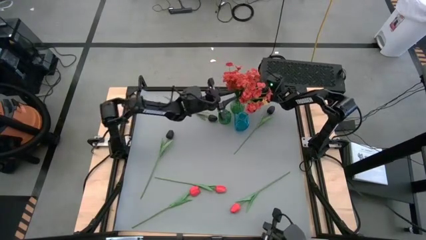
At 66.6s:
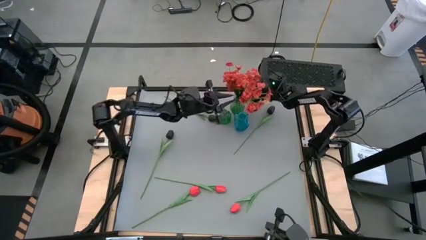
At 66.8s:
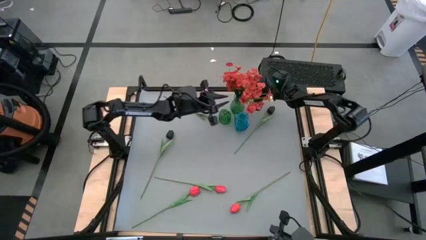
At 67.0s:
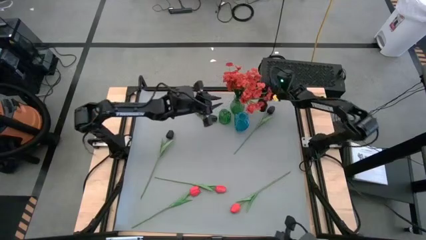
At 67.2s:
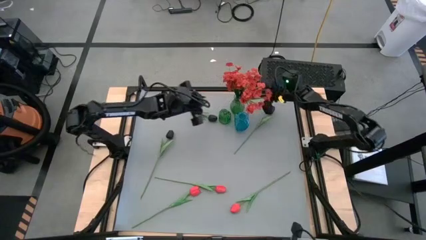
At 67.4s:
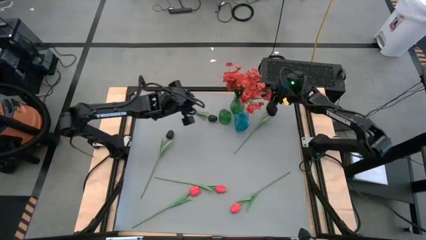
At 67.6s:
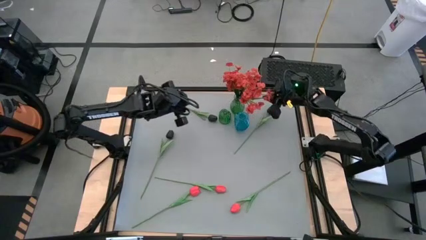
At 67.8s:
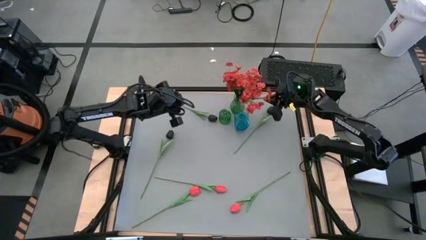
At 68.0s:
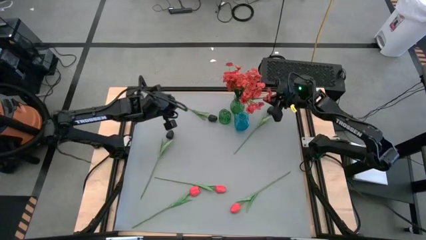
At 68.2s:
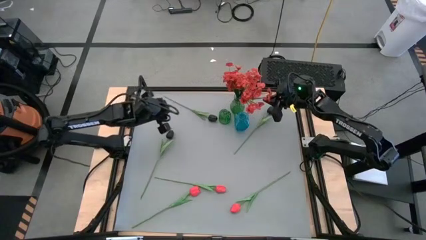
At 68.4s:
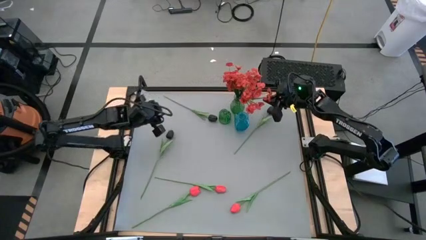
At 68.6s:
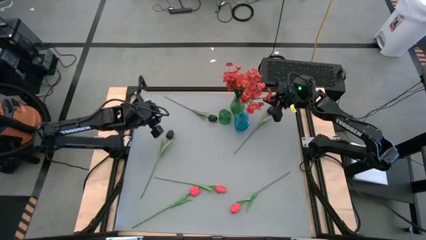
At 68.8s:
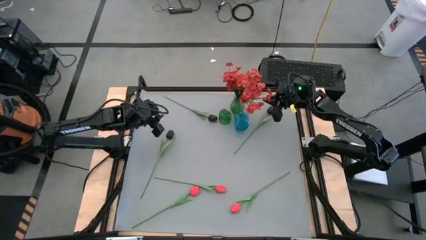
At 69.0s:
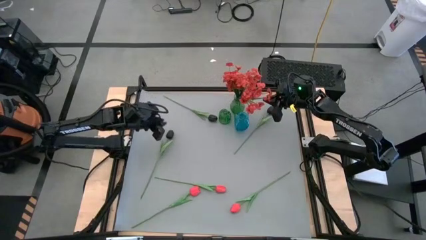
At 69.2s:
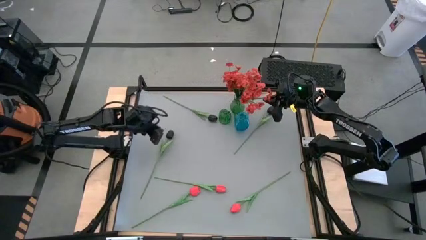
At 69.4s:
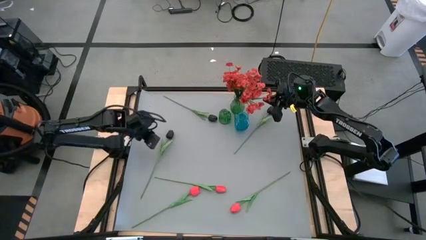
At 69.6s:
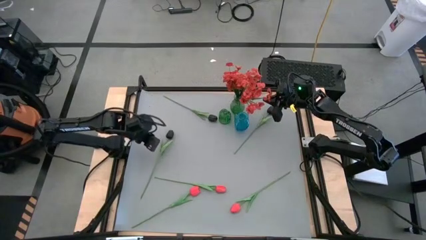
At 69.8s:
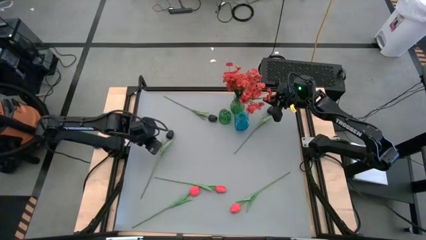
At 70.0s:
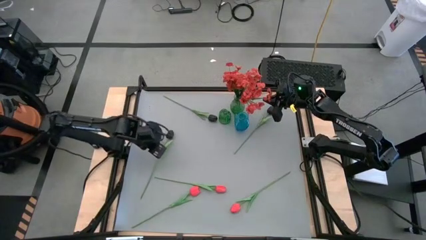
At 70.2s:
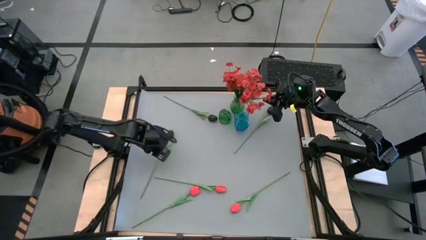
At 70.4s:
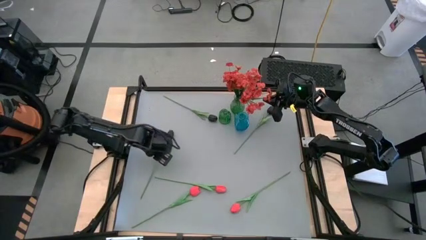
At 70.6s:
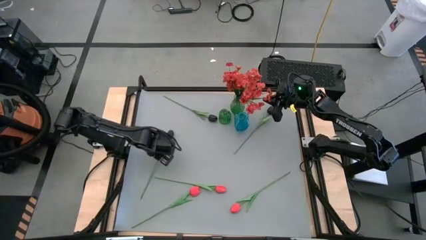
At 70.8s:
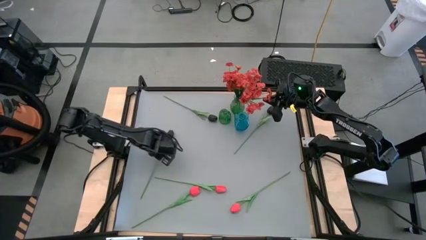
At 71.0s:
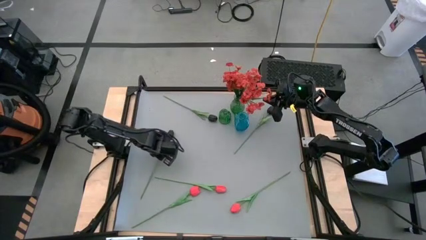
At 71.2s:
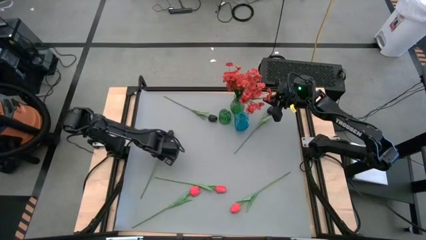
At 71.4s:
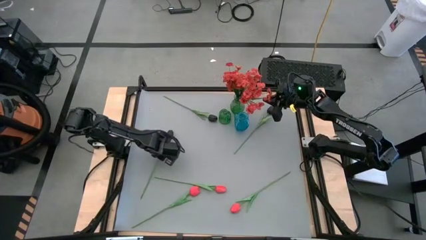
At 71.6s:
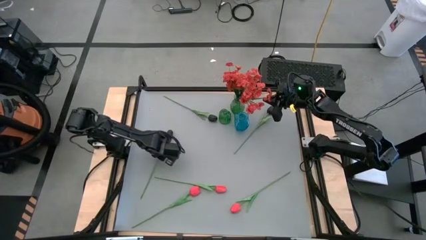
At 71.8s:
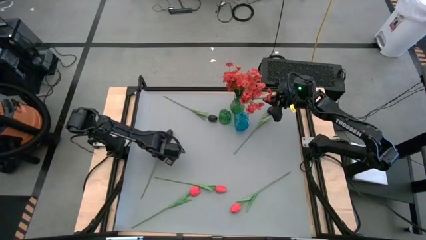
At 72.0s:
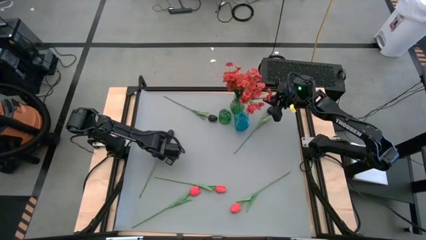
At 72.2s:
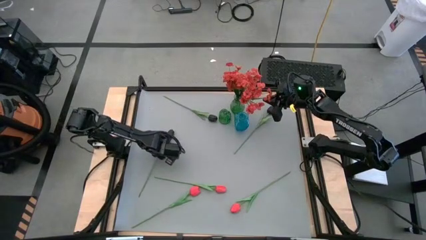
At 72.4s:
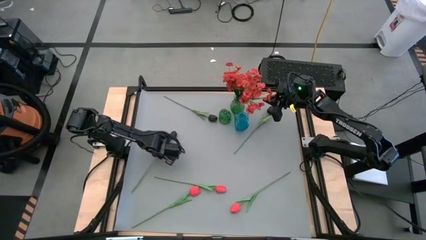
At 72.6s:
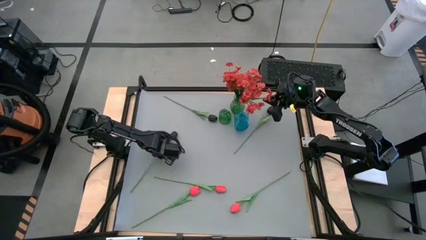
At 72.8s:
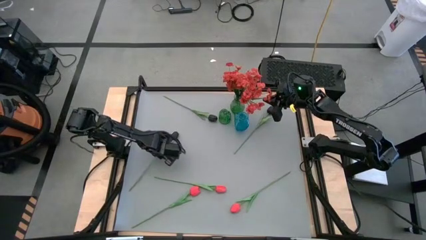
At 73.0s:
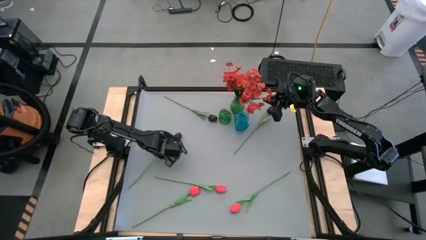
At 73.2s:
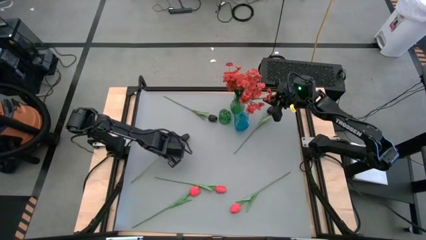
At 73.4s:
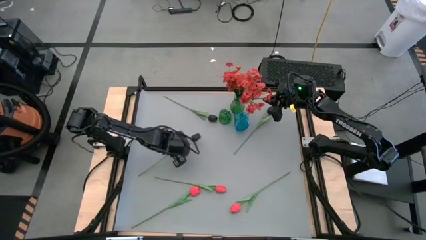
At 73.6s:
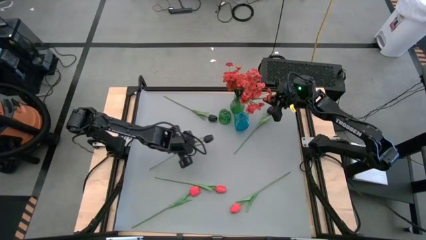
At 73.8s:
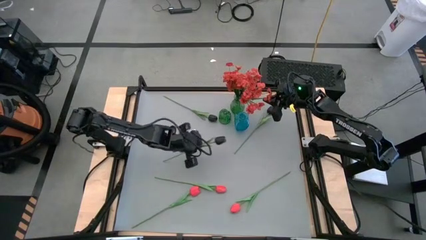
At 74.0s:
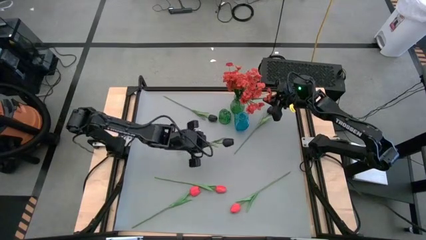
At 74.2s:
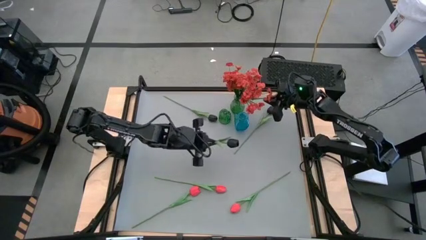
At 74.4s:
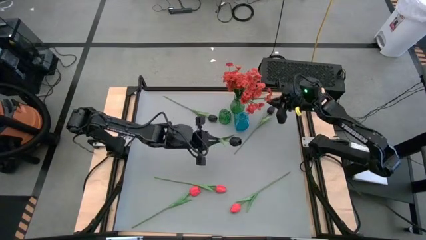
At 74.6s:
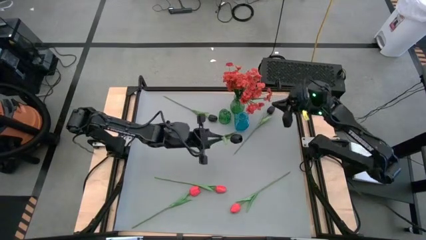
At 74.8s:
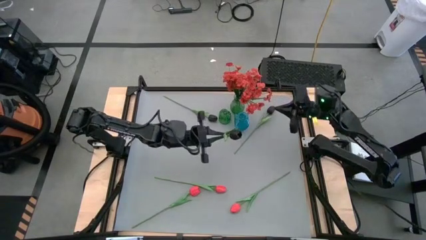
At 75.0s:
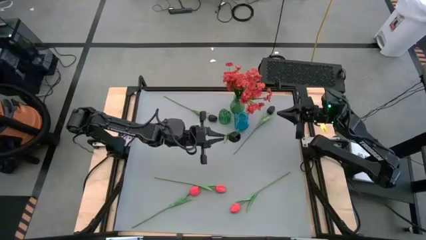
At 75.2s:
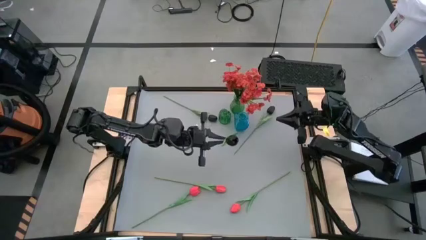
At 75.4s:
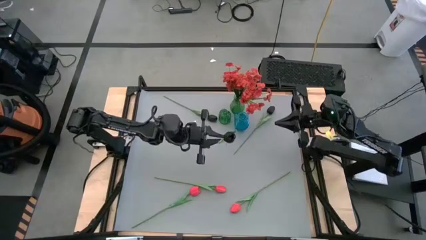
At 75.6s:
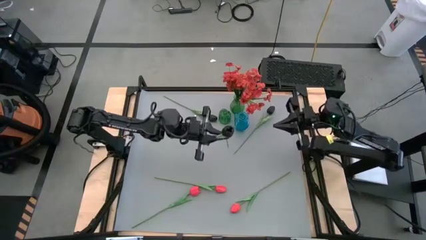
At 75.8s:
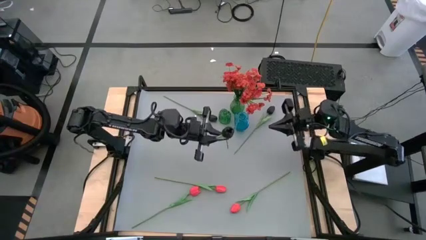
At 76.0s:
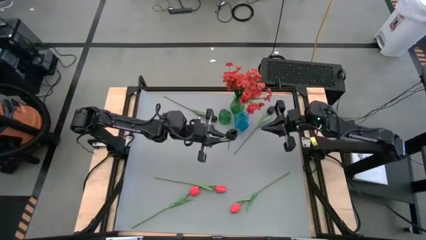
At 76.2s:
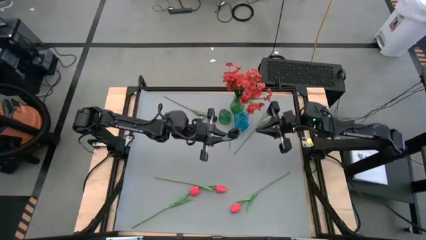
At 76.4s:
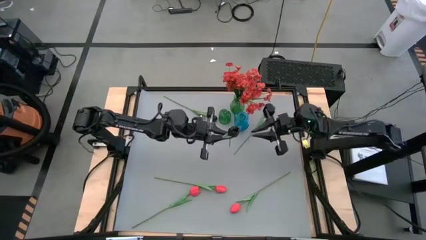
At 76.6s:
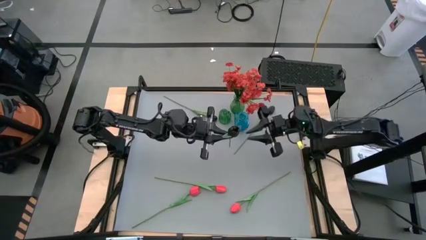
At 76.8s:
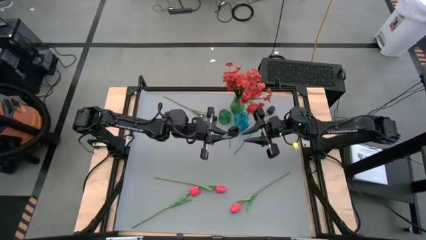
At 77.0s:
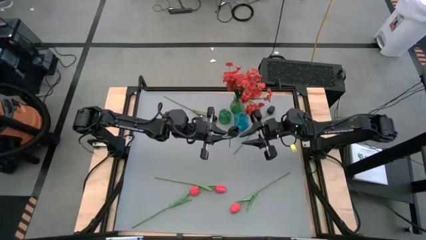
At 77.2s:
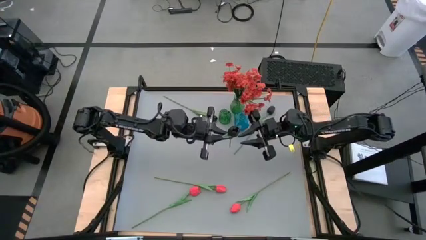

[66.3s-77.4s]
Task: Sort flowers into vase by color
Put the bottom left black flower into the blue vase

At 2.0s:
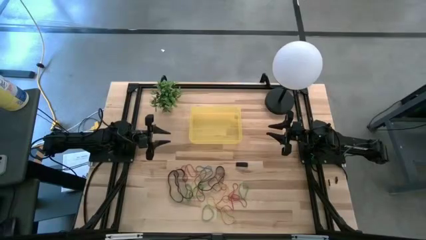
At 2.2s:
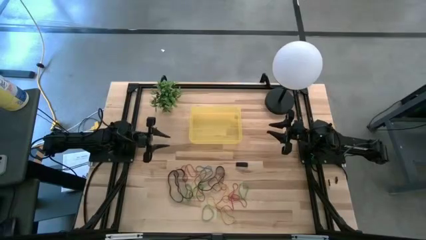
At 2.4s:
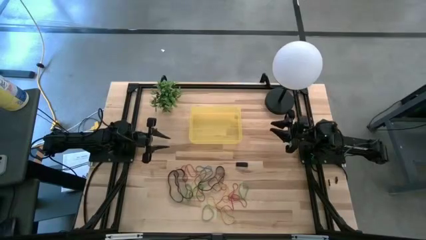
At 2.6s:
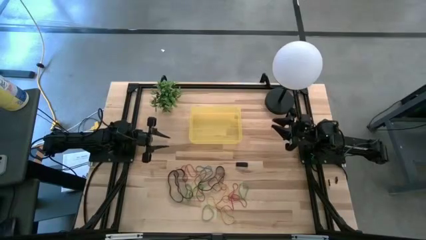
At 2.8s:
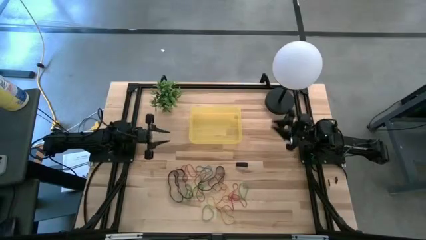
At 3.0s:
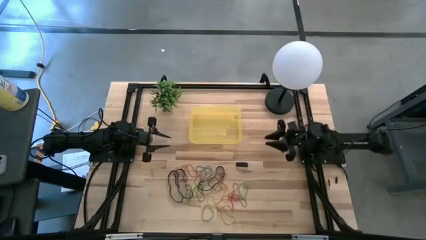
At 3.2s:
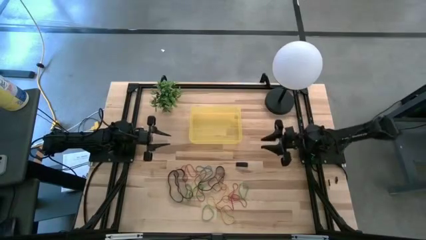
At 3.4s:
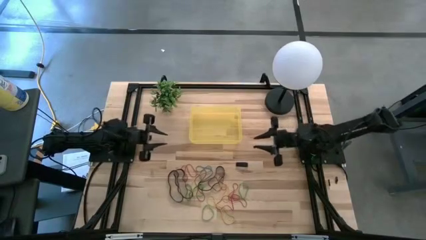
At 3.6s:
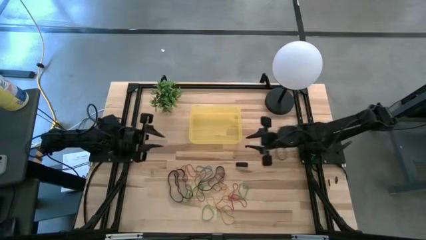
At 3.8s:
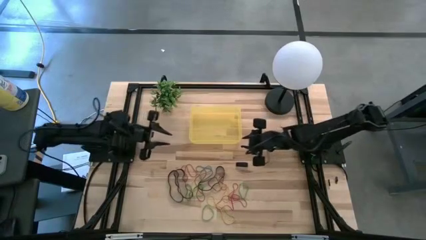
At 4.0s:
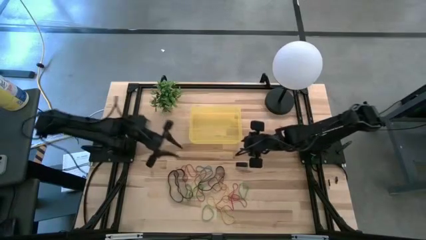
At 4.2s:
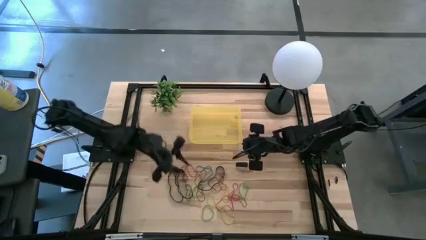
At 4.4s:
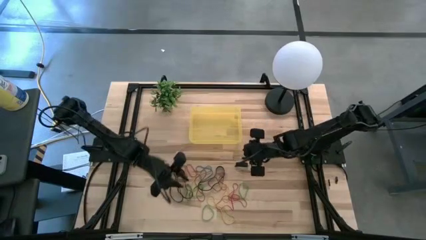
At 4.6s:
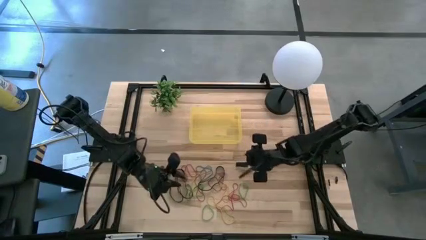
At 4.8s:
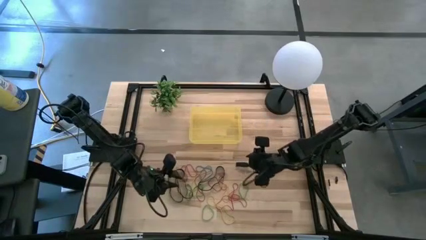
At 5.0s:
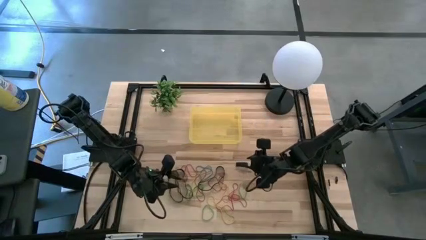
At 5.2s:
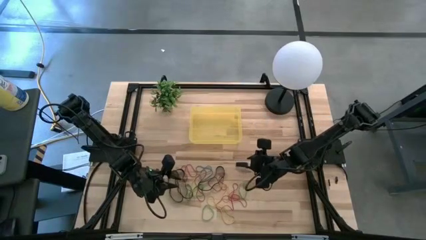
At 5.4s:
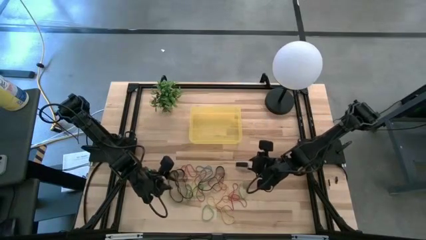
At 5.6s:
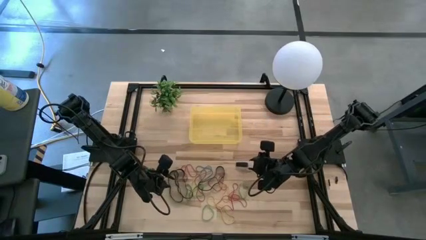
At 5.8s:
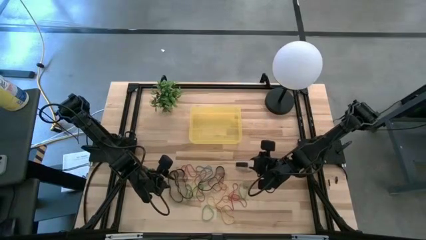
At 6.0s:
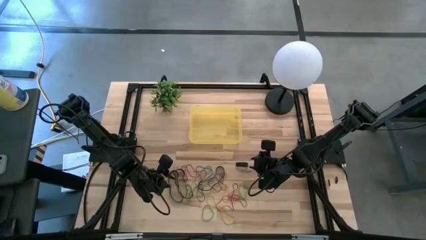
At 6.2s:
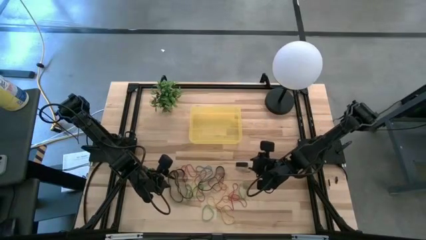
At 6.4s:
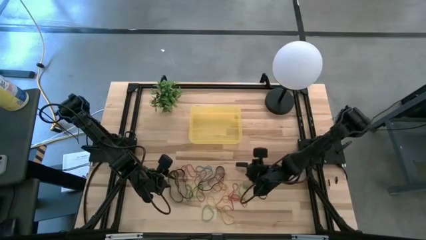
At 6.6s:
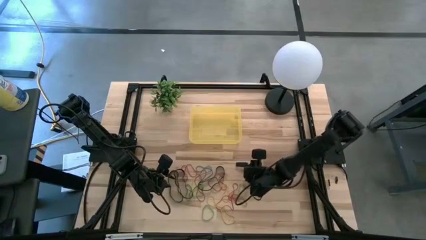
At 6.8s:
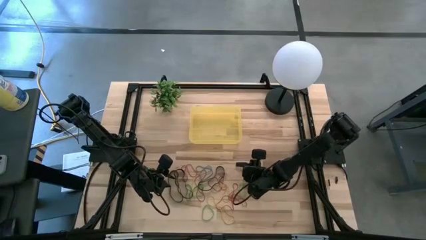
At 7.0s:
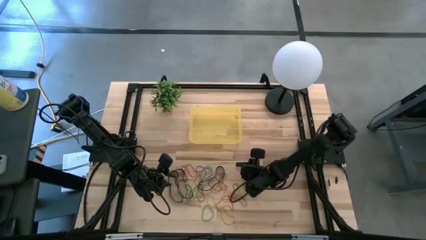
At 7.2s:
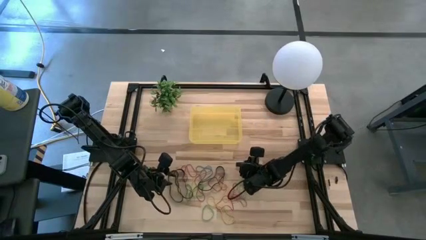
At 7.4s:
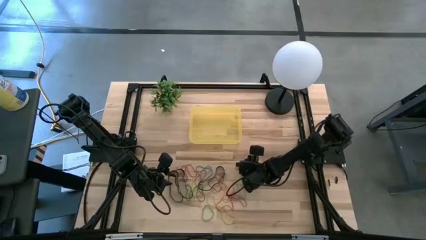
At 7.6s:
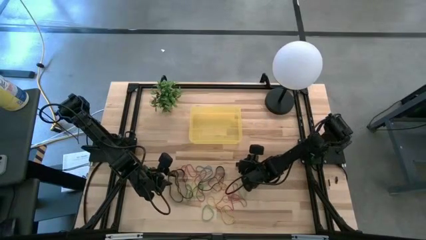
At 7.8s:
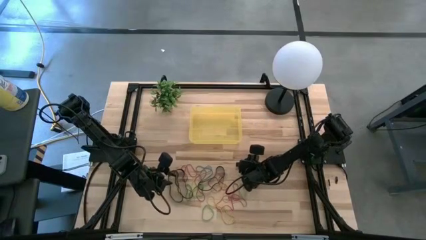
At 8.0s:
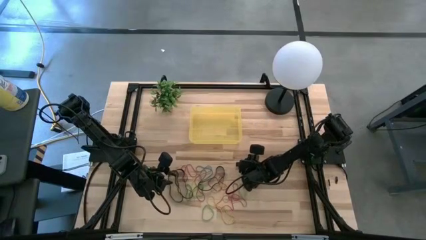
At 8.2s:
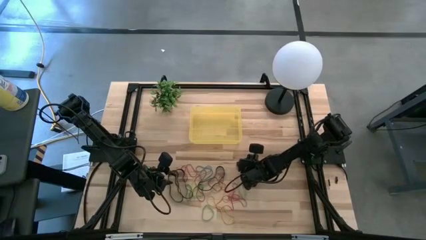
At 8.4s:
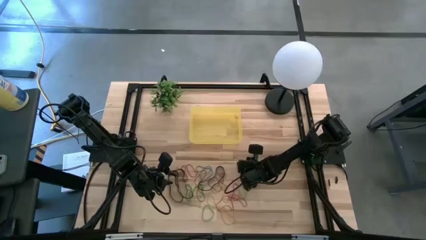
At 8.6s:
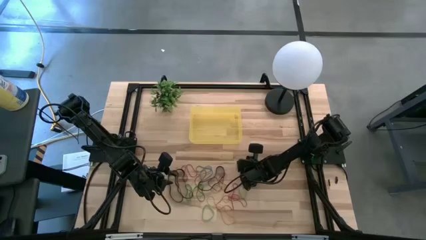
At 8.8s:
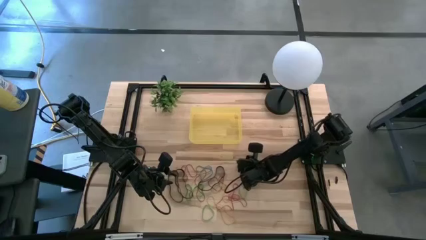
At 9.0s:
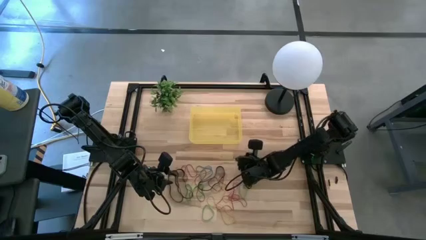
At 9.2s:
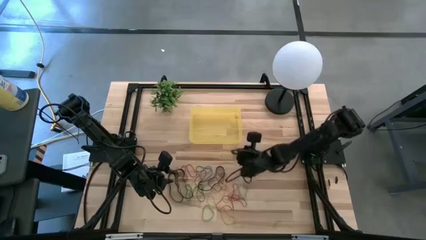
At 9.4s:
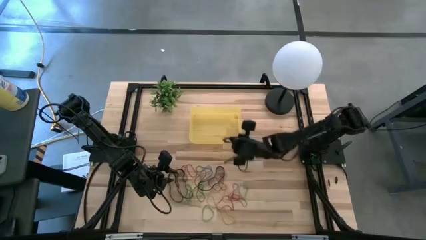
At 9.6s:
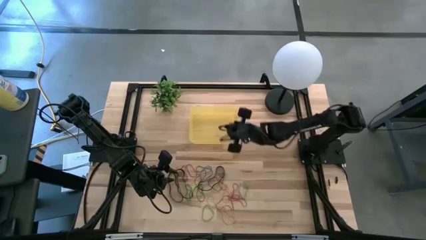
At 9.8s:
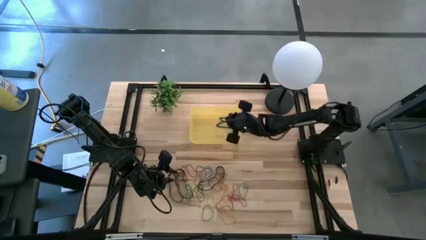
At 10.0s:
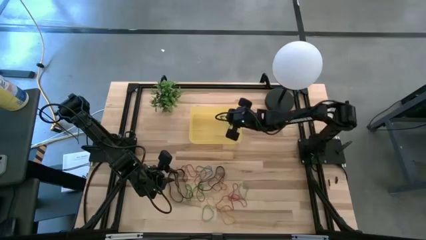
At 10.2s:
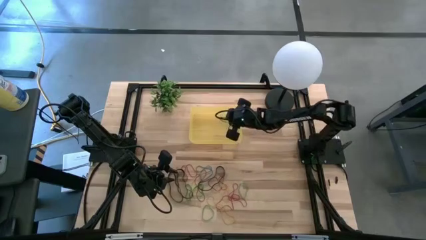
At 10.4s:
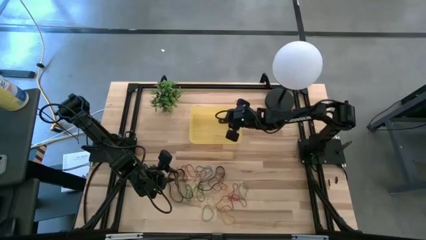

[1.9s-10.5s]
Task: Pick and place rubber bands into bin
Put the black rubber band into the yellow bin
